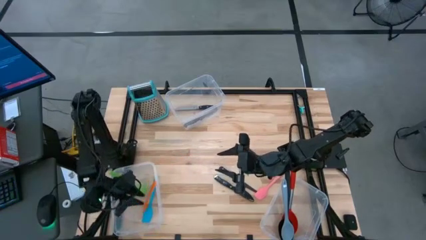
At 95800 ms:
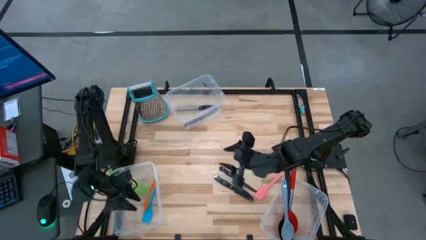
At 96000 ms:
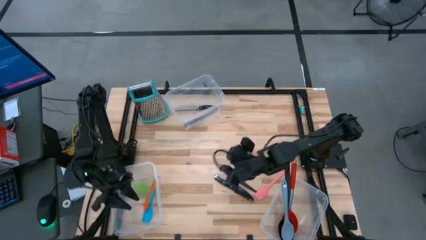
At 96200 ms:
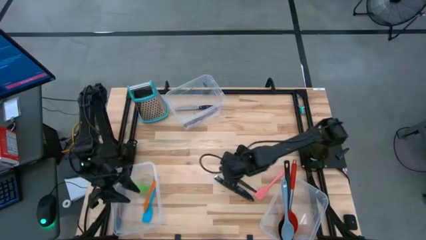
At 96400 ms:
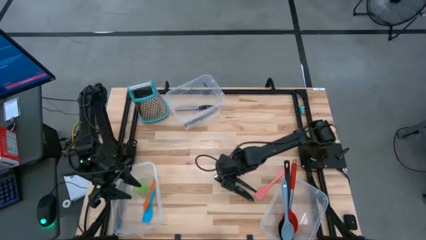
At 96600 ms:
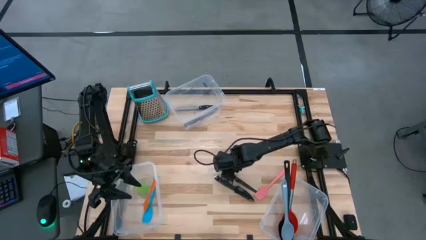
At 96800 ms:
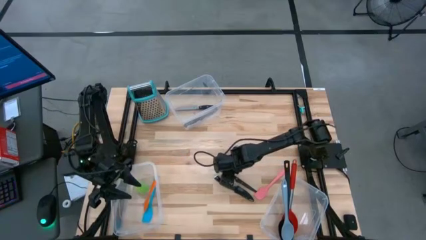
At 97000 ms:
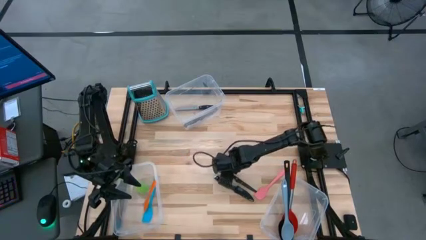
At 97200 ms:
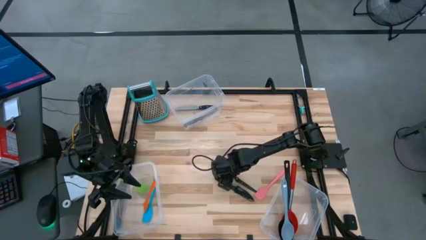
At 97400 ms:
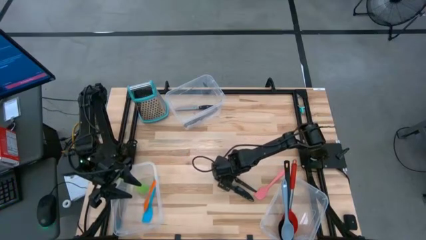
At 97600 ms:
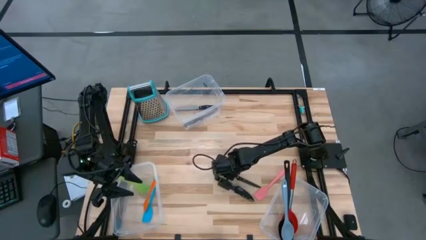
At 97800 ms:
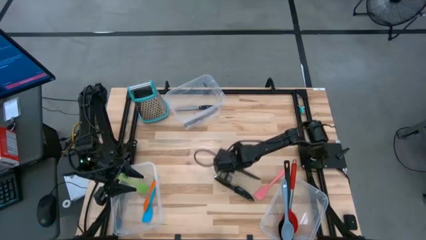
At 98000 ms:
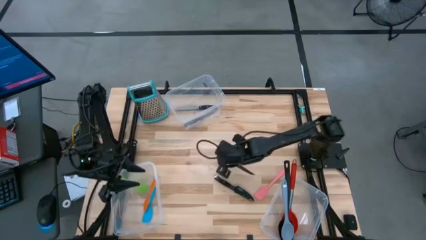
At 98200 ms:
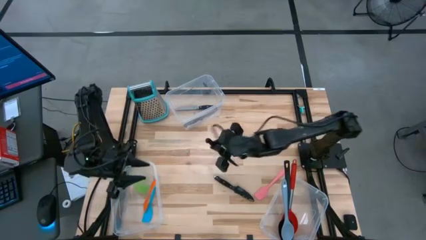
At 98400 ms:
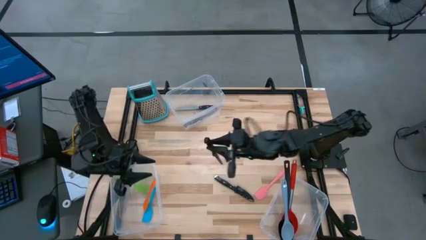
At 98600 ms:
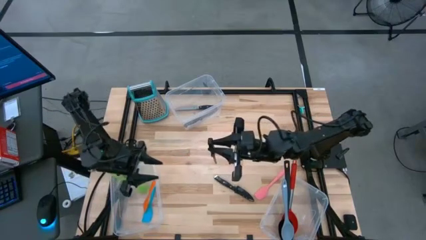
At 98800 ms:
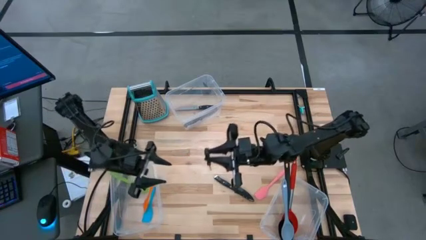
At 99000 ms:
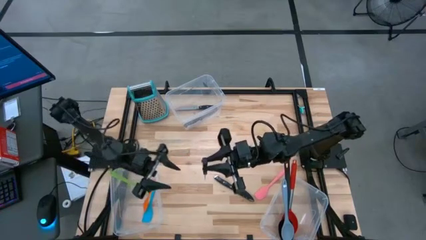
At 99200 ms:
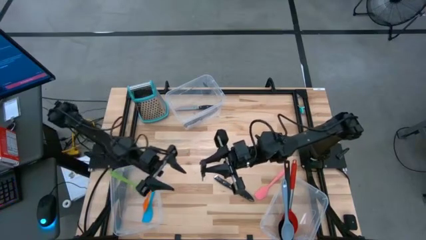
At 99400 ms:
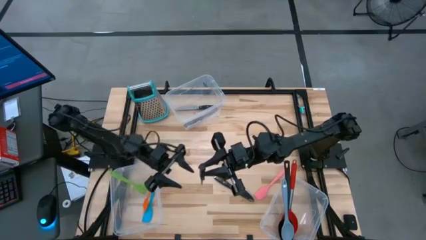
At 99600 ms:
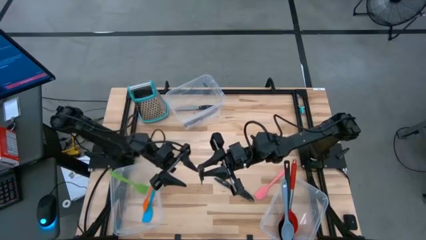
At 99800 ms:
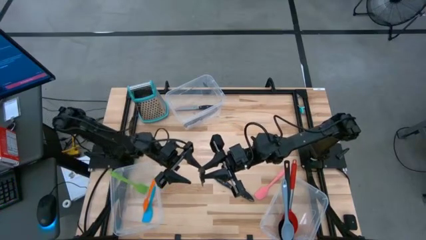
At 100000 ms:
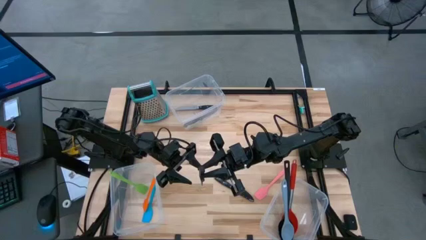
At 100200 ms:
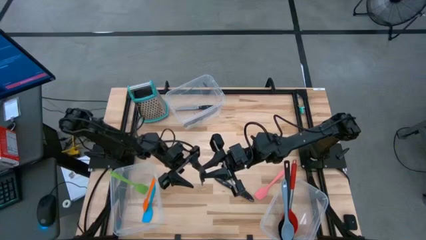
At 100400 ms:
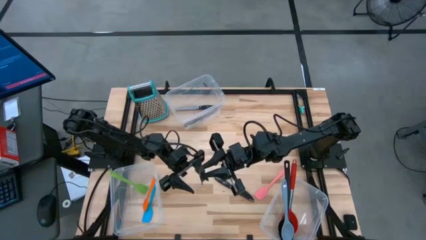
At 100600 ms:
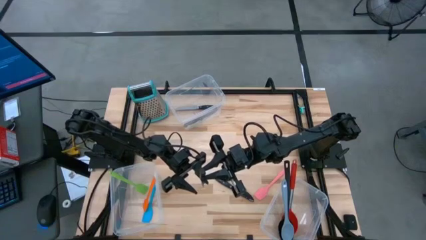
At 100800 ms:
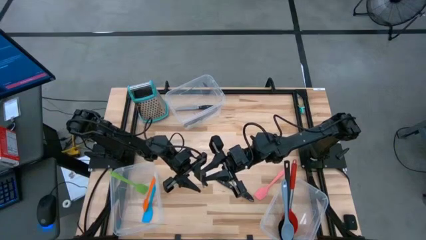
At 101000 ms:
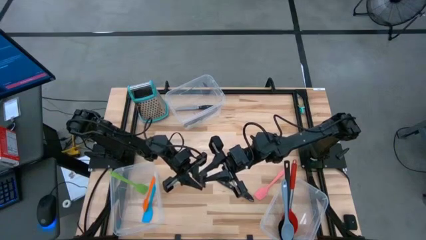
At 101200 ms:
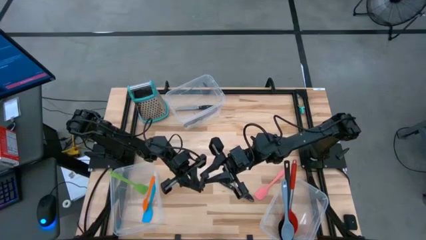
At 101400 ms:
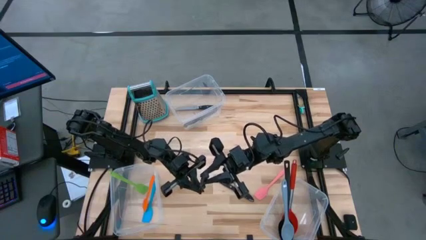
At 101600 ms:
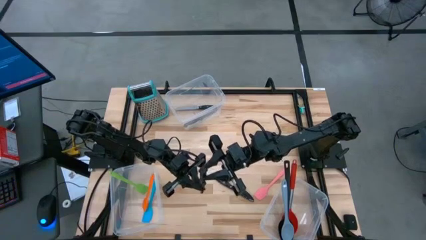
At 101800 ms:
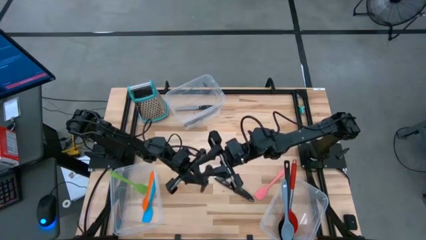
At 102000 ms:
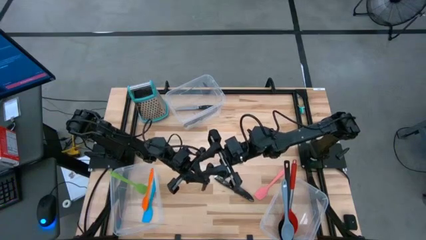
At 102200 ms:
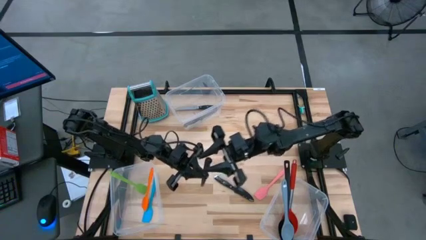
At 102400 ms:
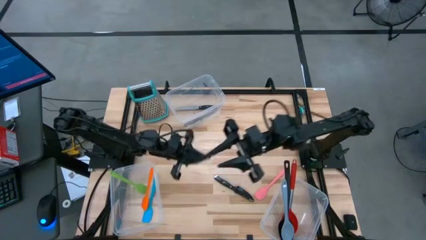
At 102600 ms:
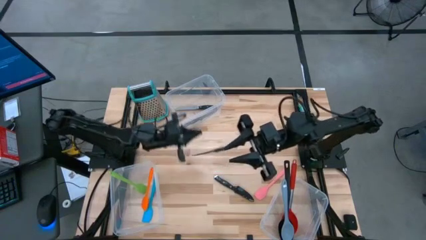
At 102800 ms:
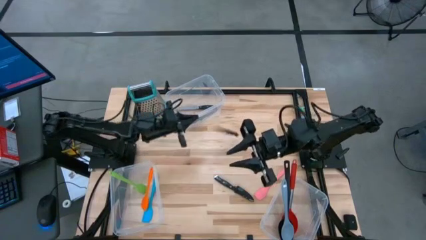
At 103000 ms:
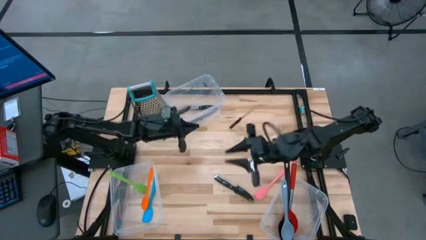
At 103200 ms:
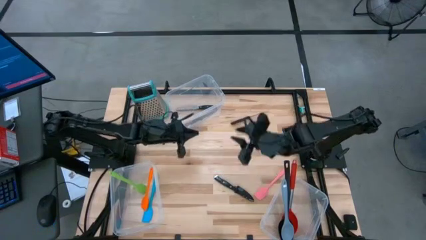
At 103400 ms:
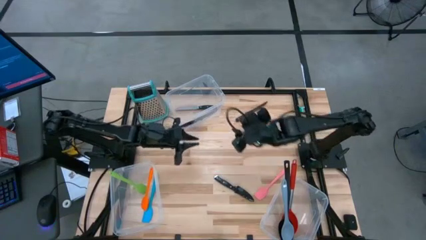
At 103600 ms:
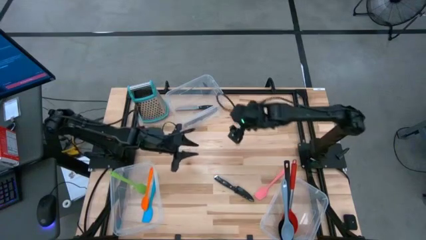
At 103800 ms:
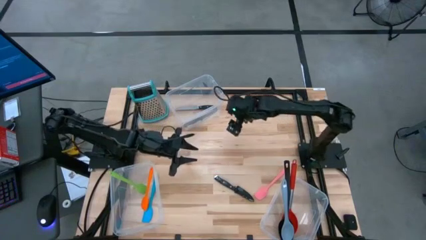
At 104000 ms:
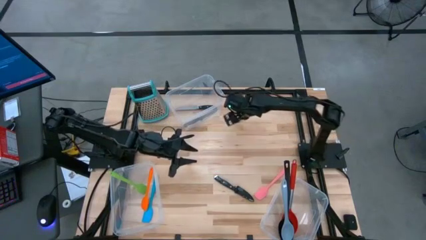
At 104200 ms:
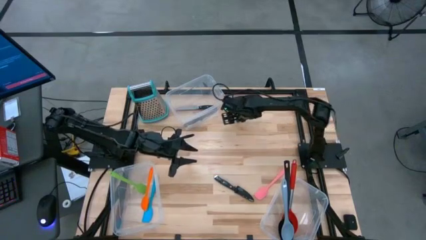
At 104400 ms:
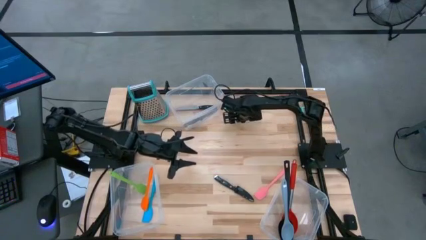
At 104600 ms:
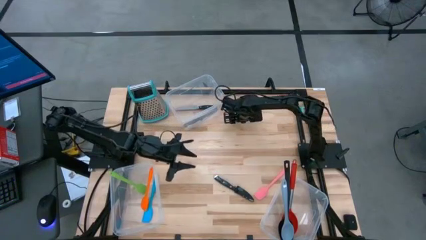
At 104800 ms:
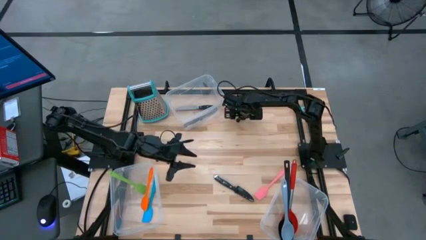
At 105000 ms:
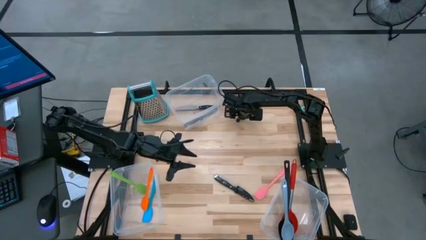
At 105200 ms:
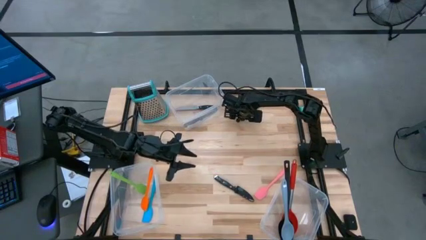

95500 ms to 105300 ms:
Task: Pick & Place Kitchen Items
Put the black knife into the top transparent bin

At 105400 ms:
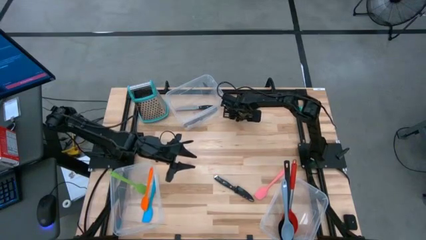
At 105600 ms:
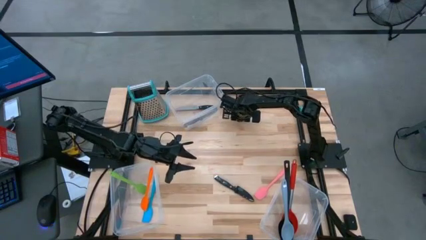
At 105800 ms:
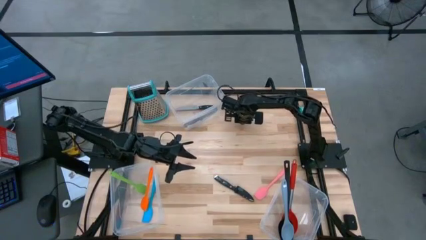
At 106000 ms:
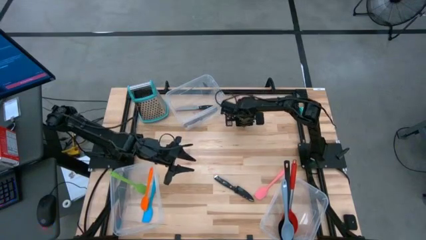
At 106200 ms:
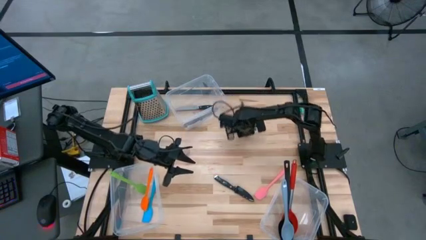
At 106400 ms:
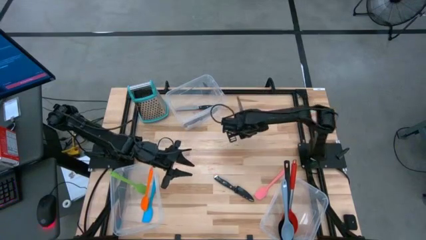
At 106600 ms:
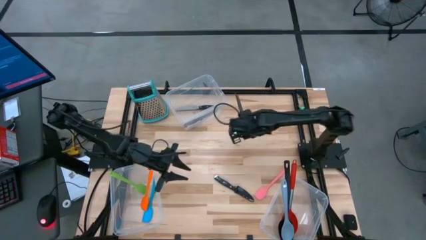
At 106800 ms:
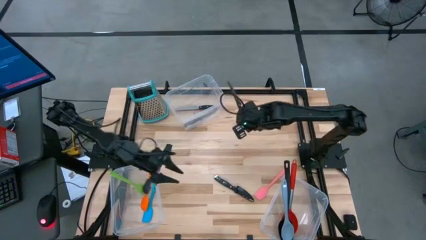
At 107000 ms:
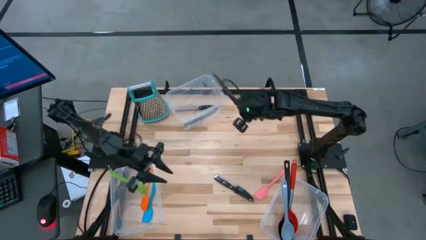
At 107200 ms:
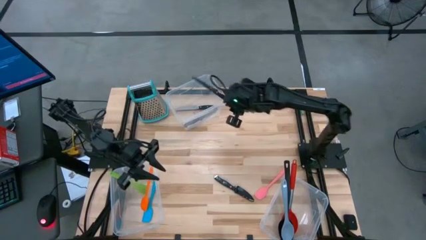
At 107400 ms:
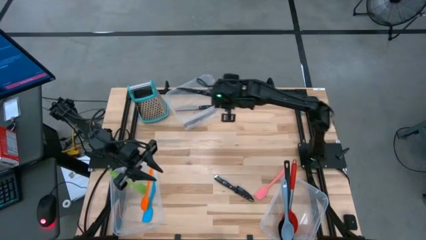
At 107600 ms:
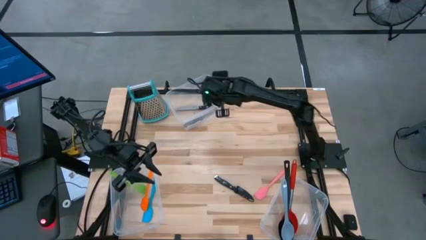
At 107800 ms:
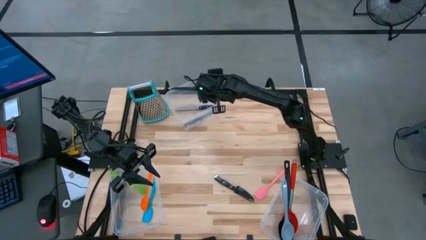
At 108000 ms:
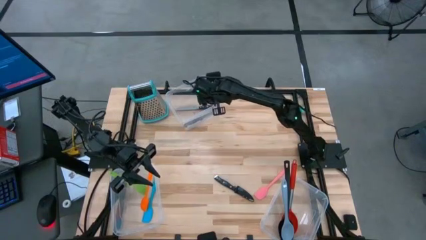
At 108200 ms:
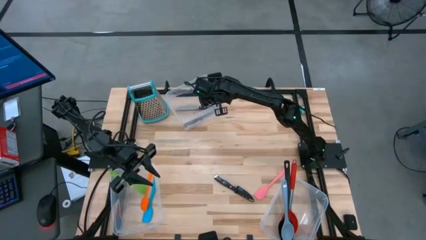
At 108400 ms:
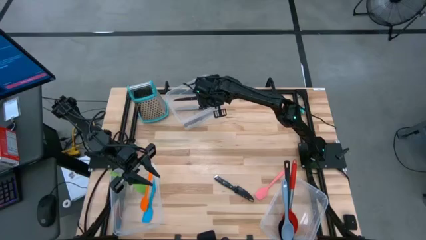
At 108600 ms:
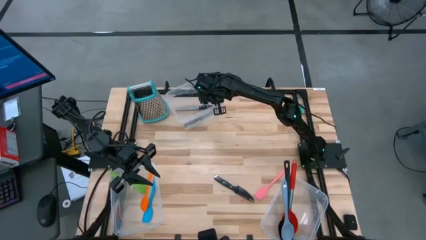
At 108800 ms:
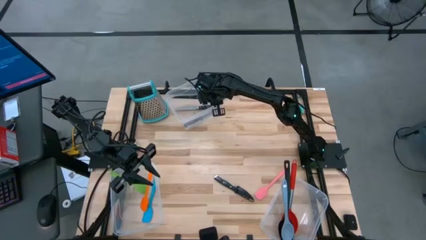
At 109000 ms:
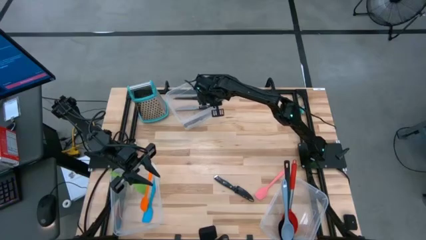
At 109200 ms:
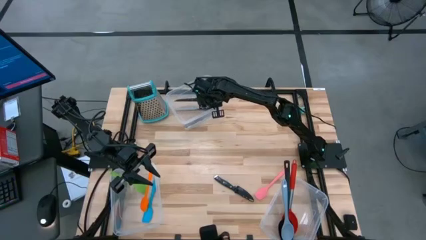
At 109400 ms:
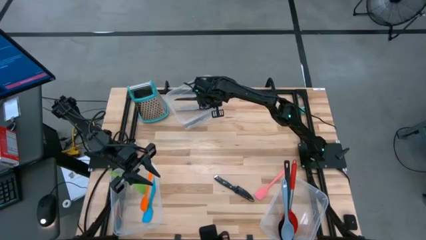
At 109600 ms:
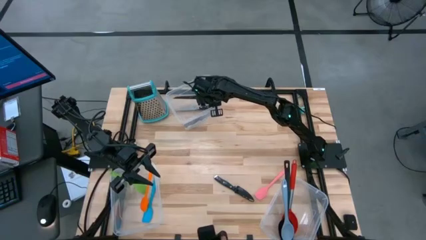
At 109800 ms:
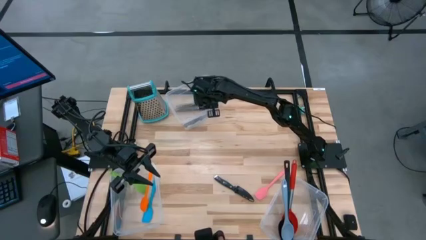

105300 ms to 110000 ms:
Put the black knife into the top transparent bin

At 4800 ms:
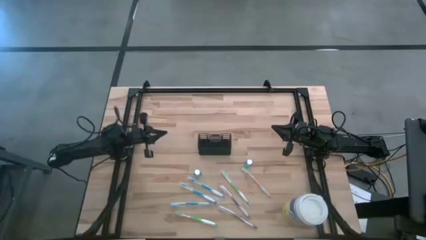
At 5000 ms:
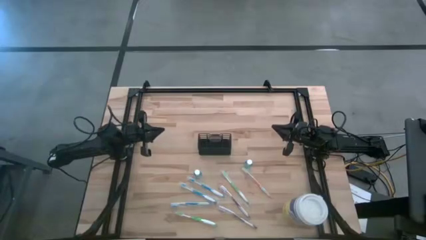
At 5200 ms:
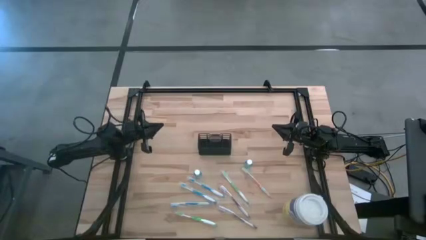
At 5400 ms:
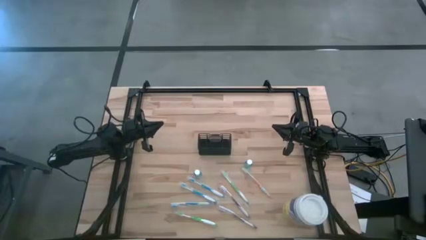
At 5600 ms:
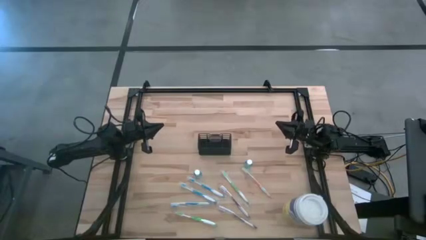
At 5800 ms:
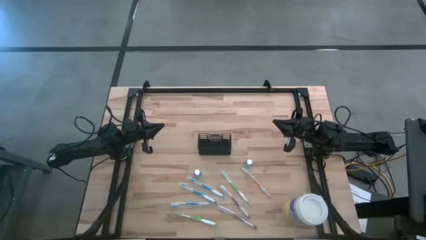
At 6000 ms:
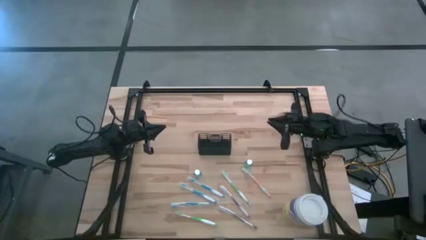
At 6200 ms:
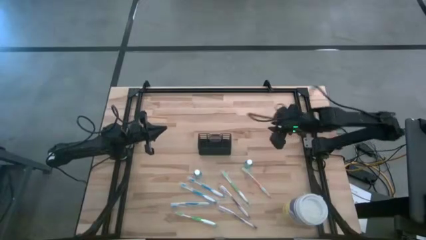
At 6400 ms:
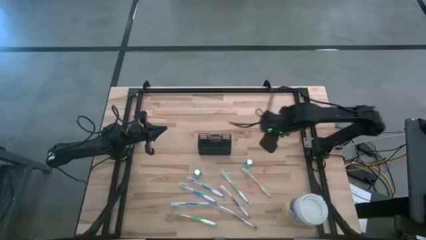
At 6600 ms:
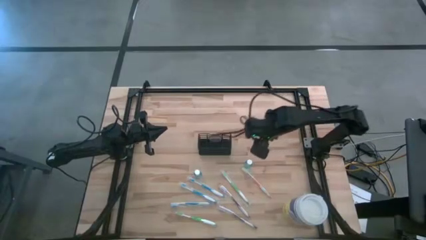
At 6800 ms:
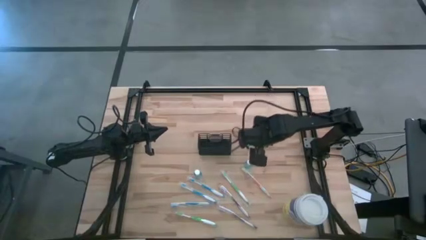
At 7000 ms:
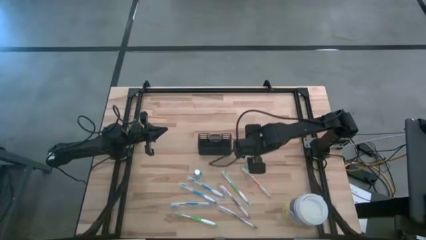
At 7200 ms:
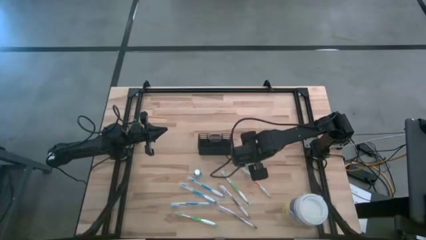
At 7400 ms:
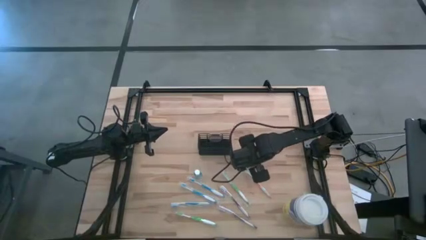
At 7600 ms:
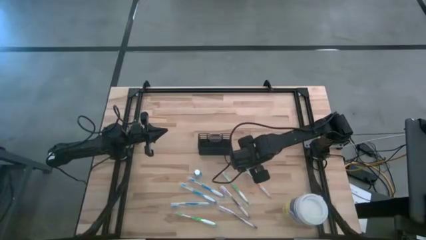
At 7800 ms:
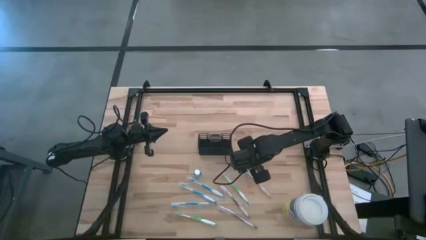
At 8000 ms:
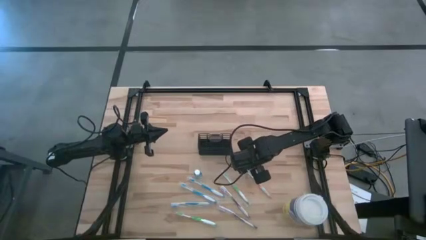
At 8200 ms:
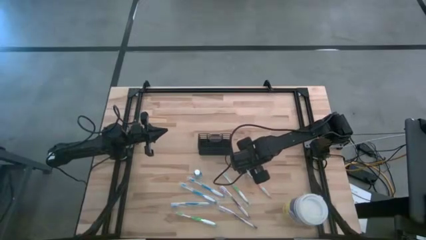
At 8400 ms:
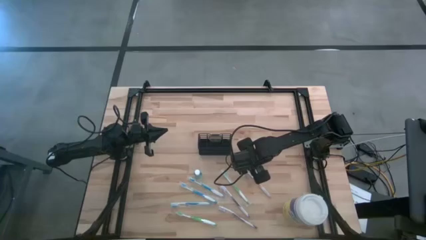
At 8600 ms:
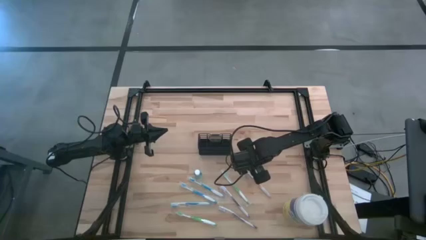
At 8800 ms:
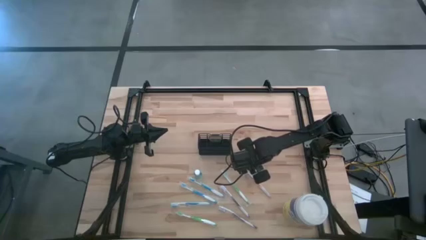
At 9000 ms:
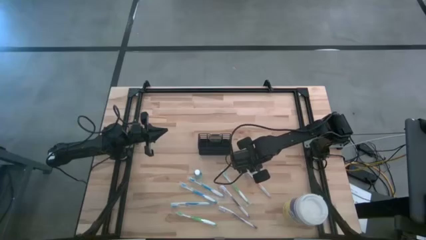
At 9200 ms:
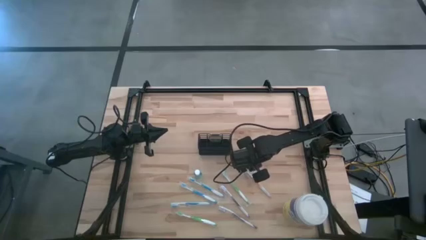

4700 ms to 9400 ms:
Task: Pick & Place toothbrushing station
Put the right blue mouthwash into the black mesh organizer
